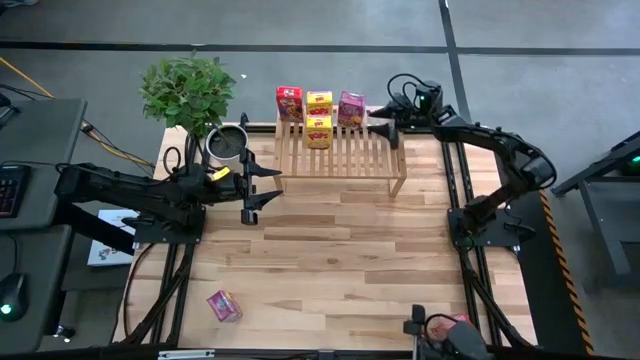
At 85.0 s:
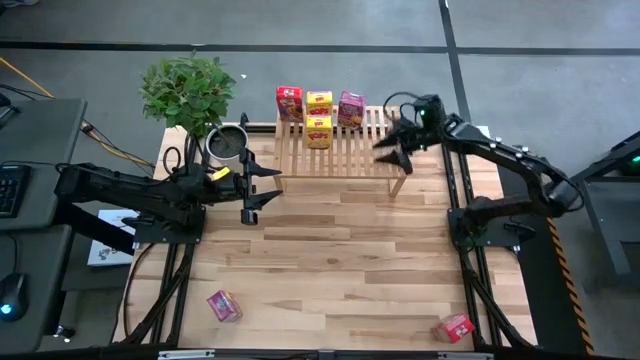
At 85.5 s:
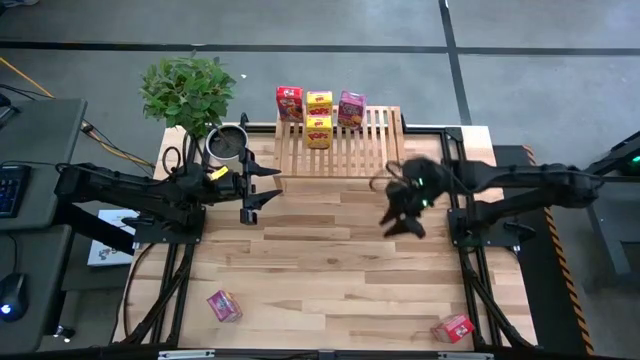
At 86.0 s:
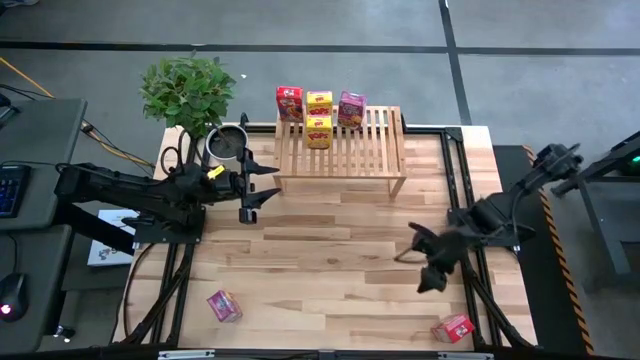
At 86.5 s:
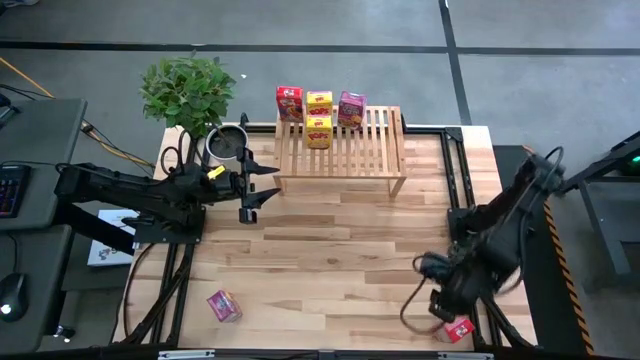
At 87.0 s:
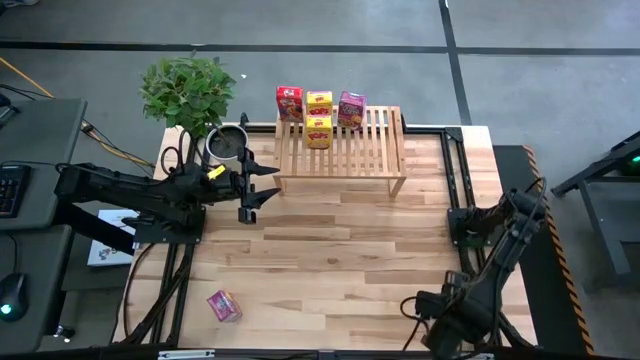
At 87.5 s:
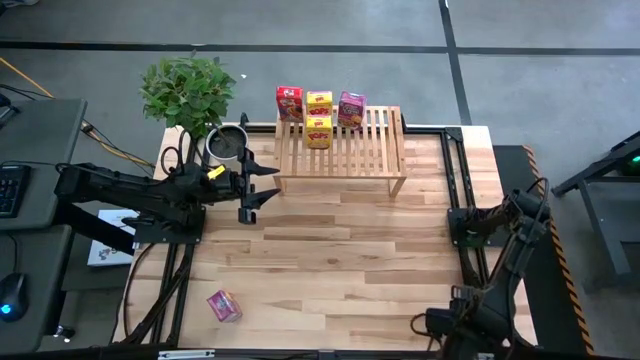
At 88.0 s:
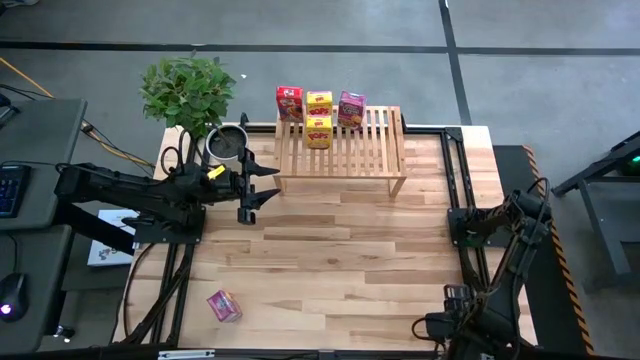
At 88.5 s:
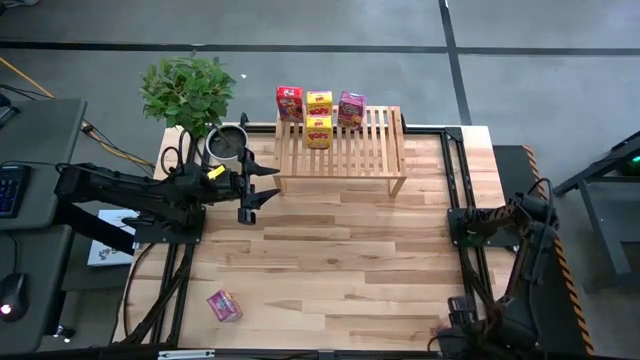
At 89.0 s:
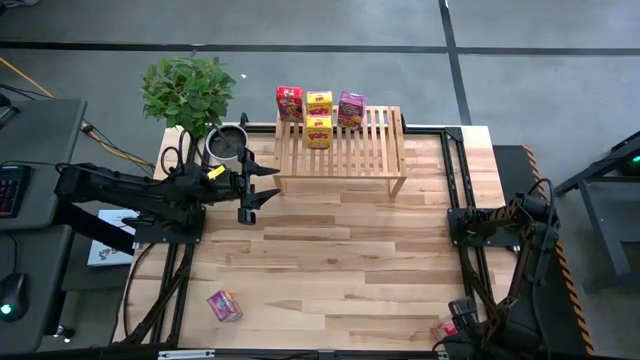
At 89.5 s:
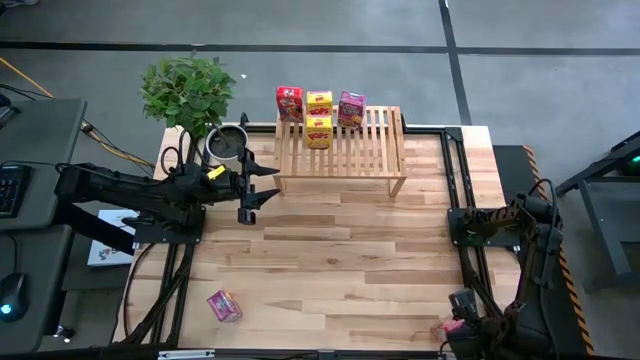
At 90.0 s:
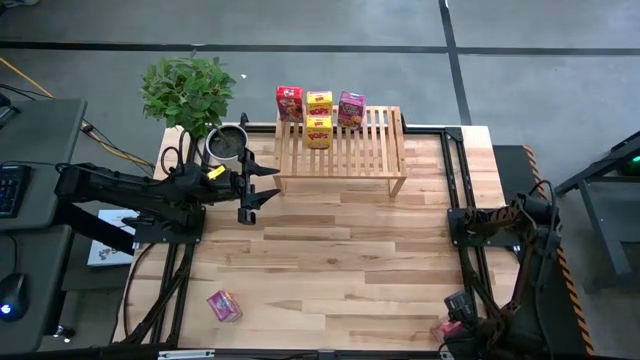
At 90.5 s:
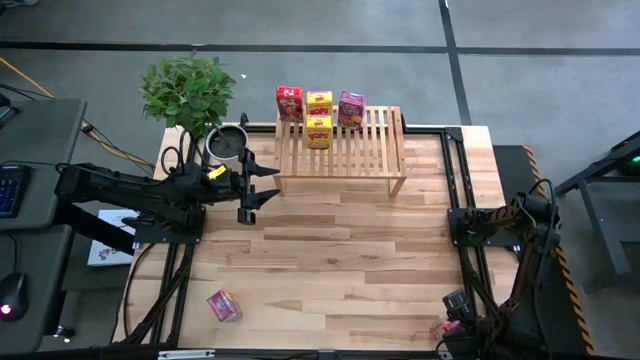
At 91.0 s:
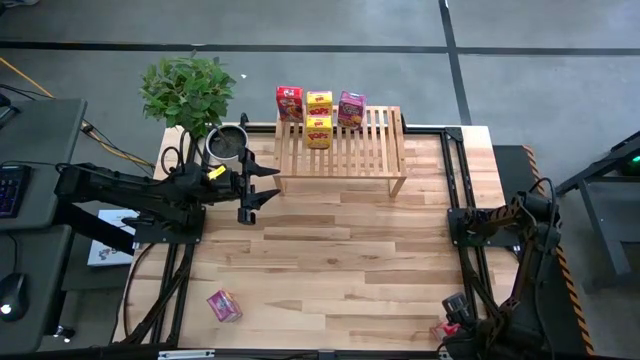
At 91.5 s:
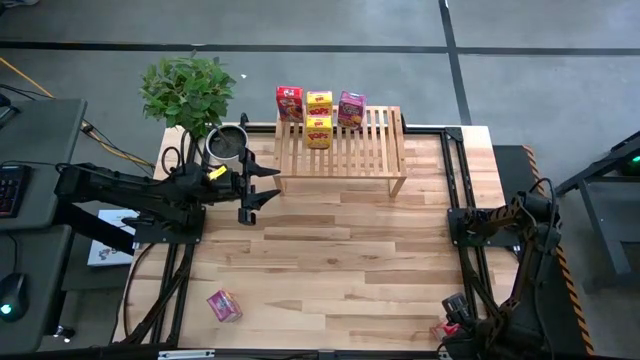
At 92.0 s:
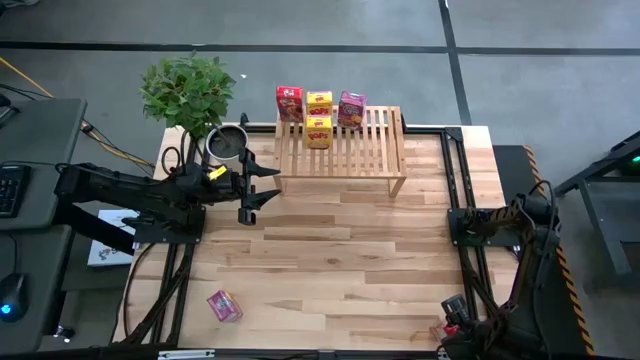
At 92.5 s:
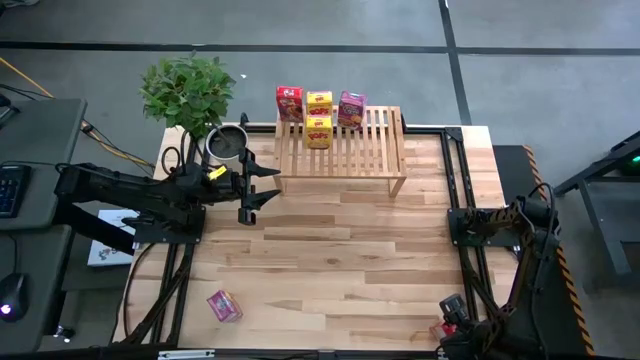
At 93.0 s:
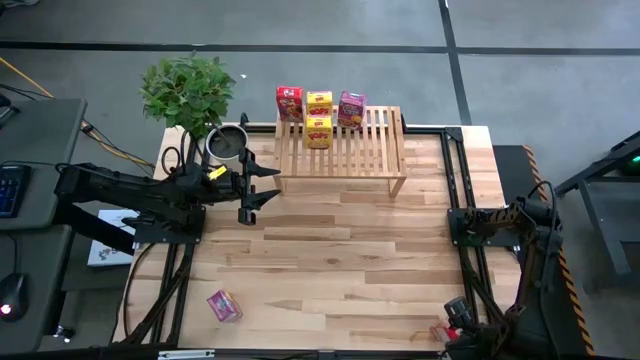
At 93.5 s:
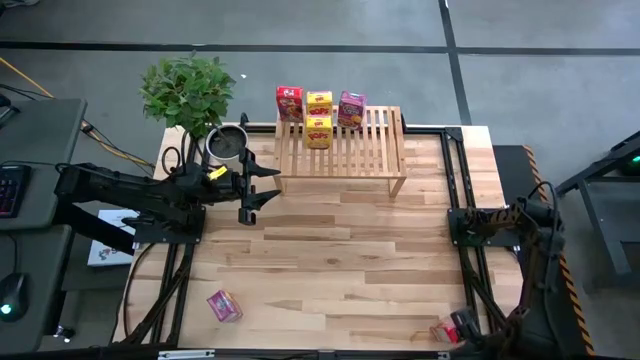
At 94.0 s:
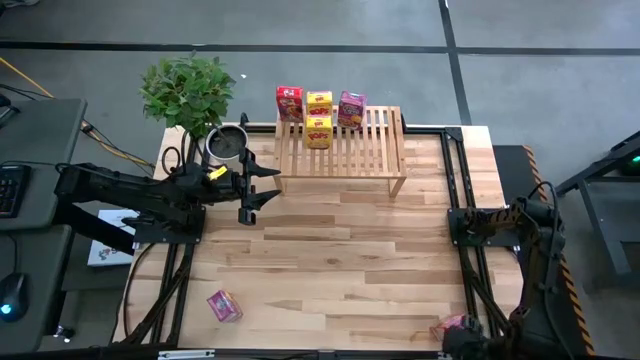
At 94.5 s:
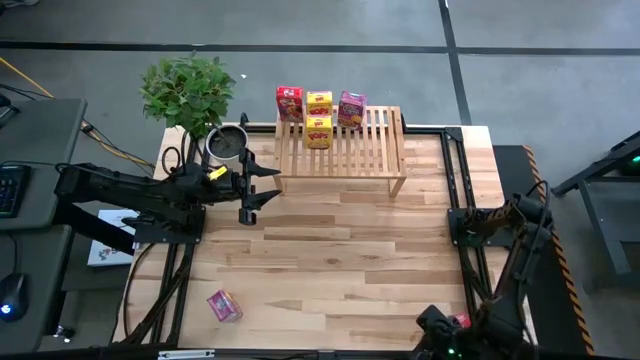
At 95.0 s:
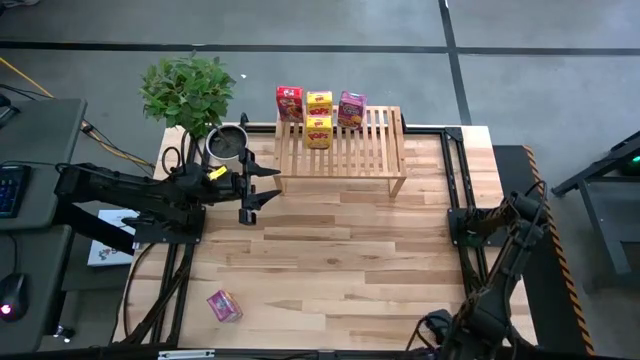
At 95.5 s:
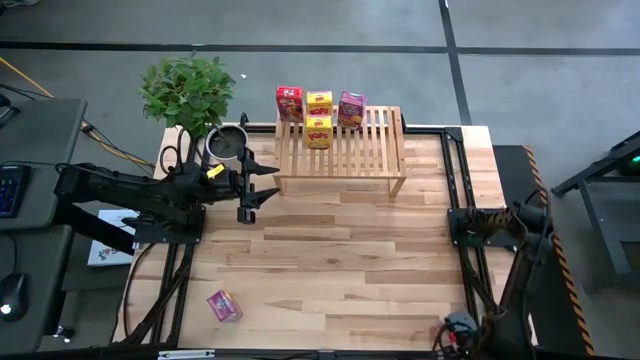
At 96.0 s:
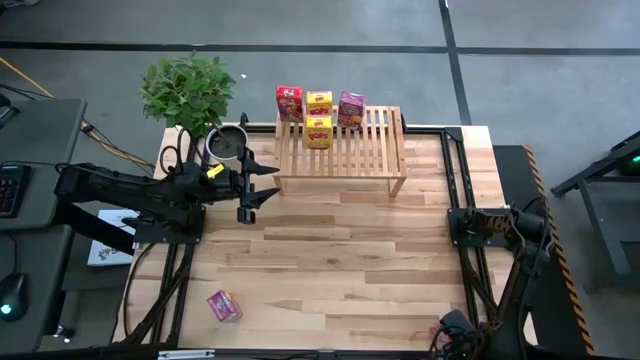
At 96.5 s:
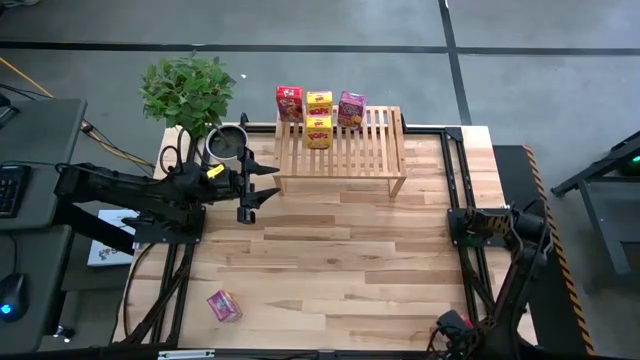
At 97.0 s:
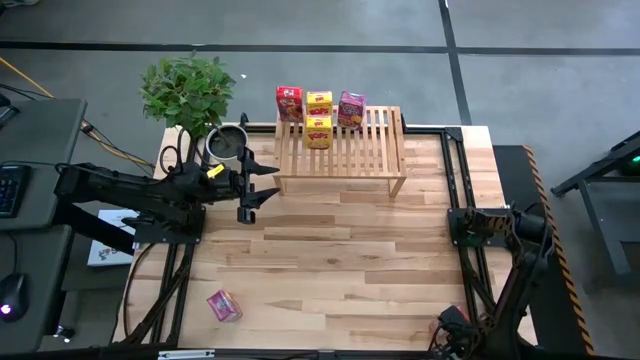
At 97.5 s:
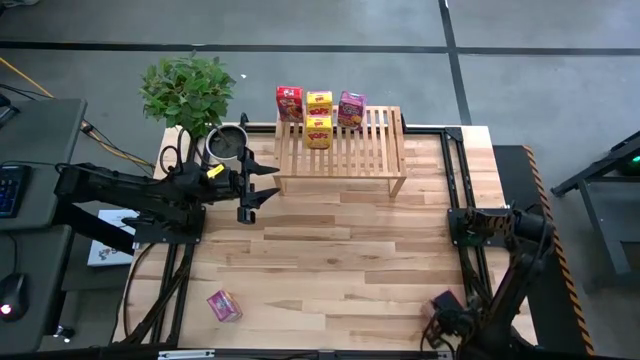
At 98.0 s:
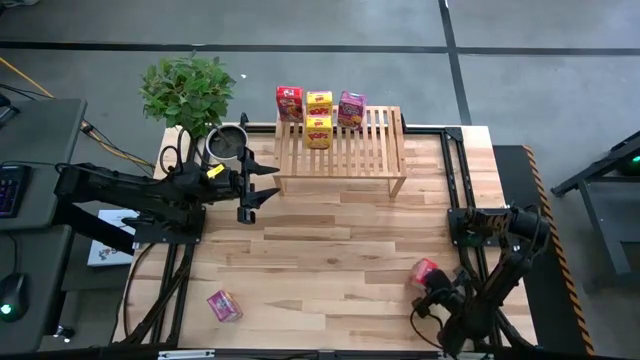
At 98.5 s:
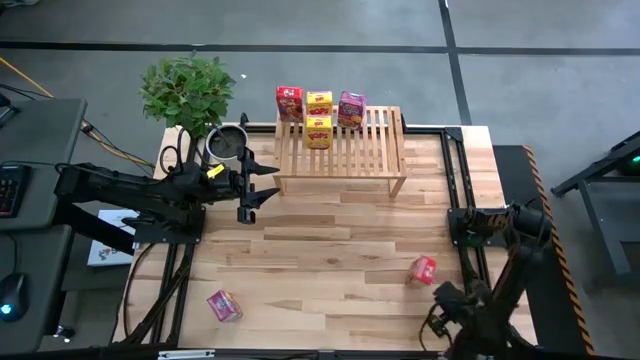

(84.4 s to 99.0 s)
Task: Stack cereal on shelf
Align the red cereal box with the other red cereal box on the shelf

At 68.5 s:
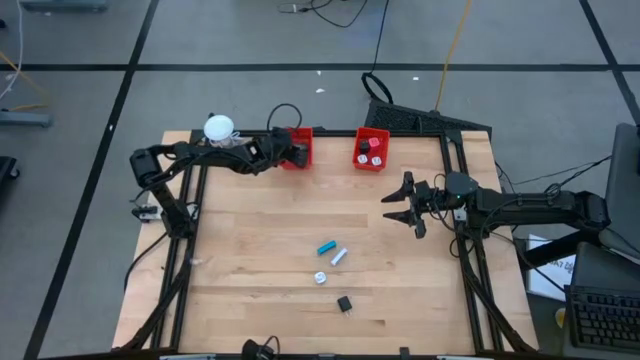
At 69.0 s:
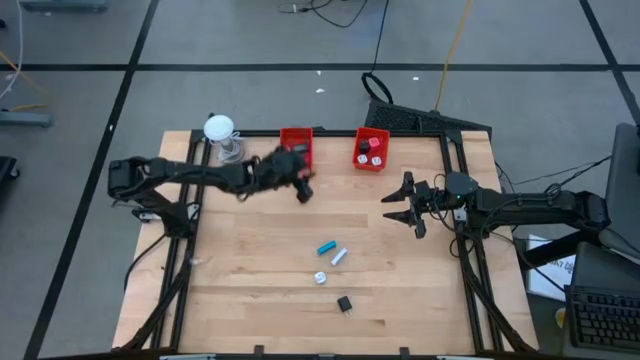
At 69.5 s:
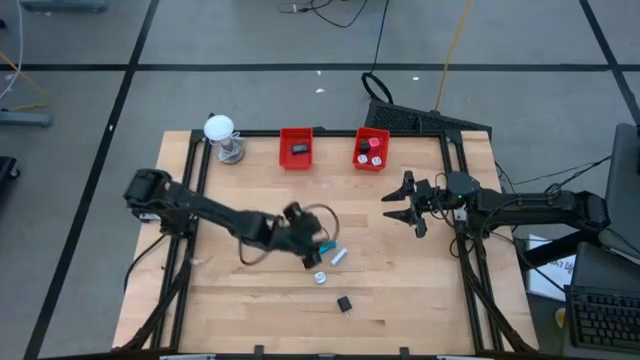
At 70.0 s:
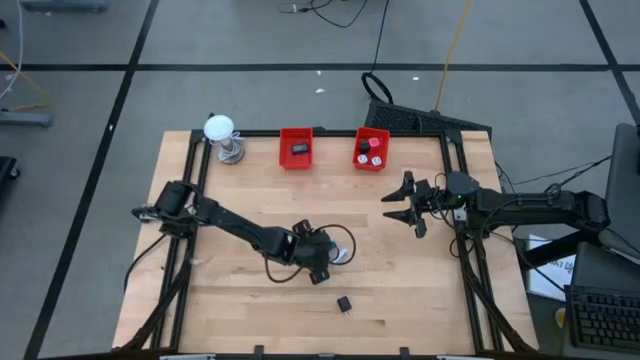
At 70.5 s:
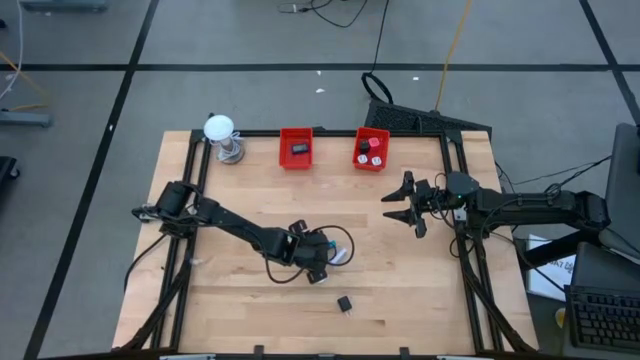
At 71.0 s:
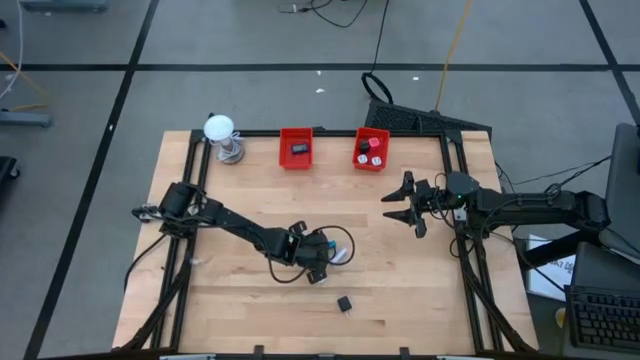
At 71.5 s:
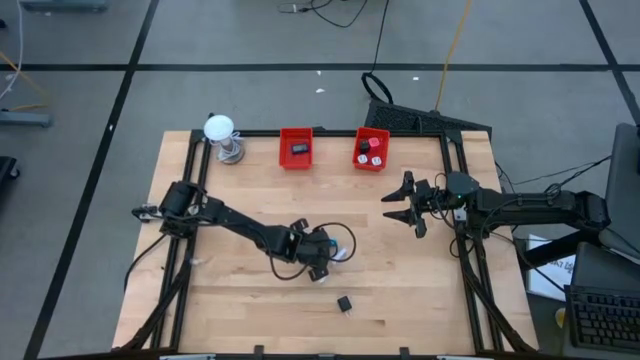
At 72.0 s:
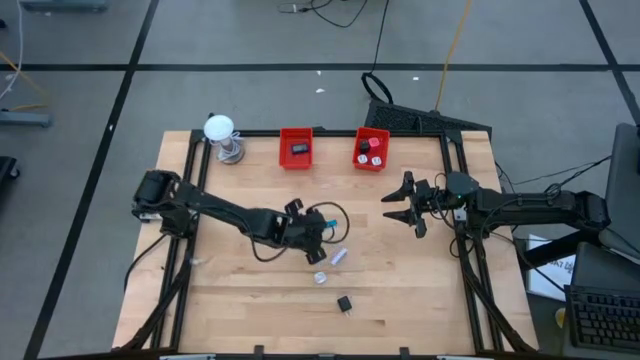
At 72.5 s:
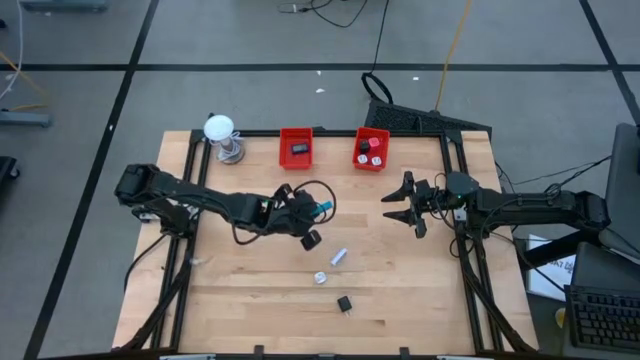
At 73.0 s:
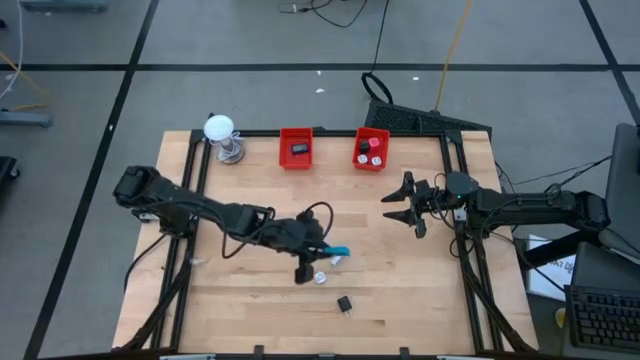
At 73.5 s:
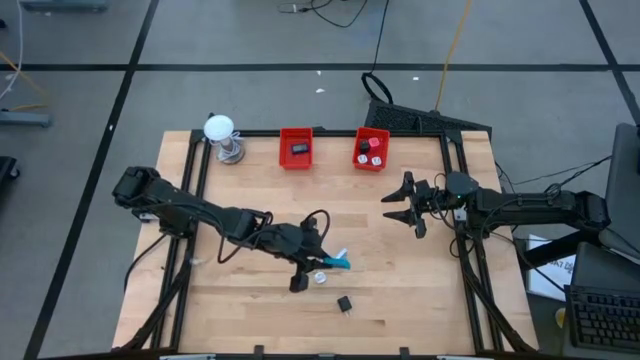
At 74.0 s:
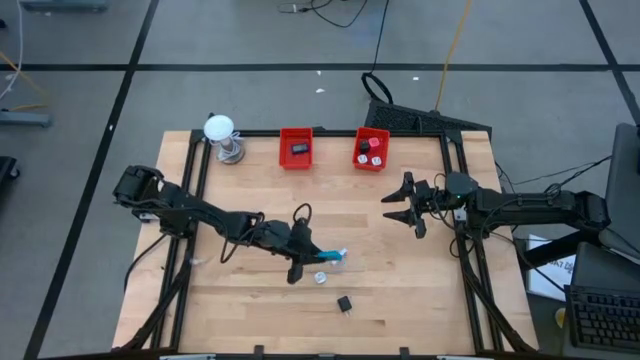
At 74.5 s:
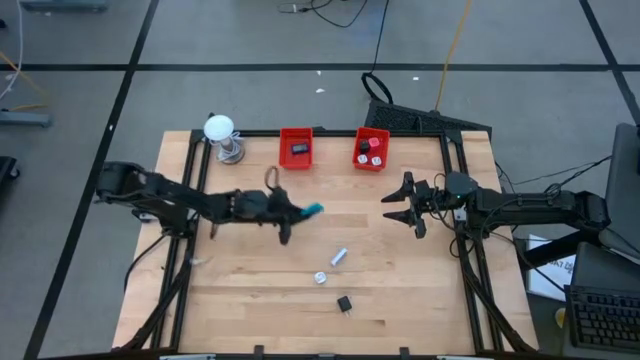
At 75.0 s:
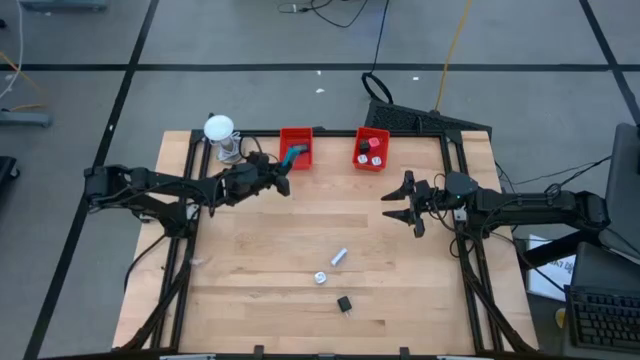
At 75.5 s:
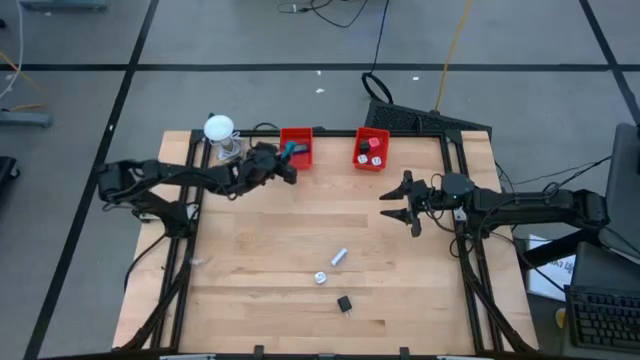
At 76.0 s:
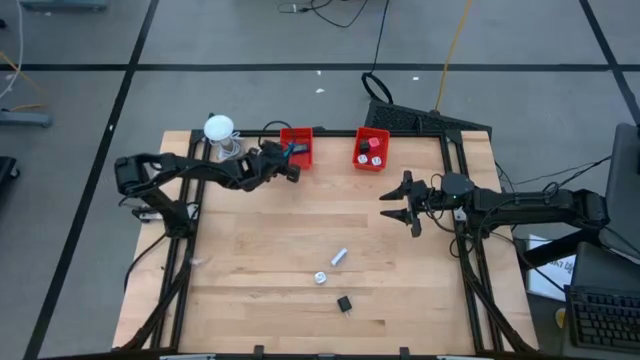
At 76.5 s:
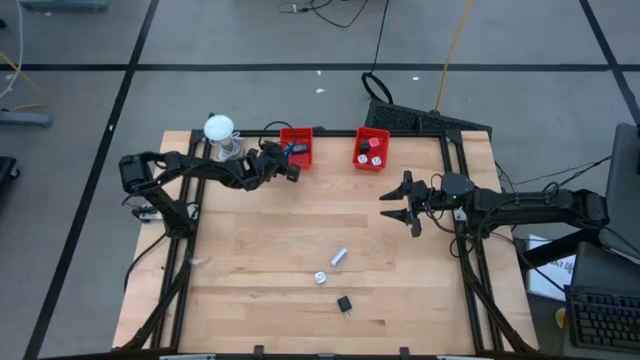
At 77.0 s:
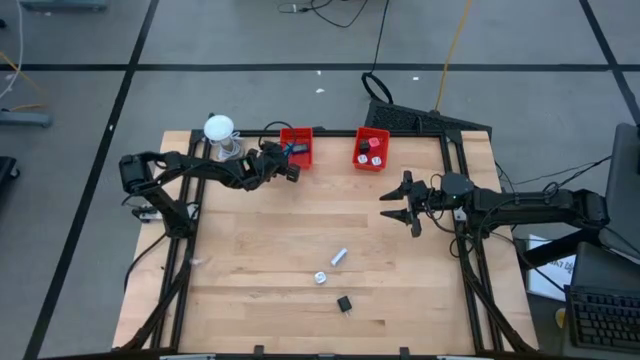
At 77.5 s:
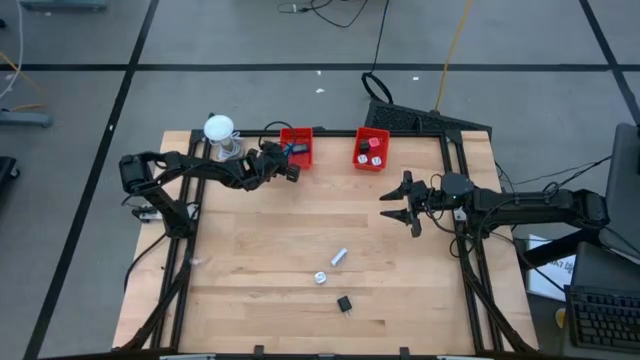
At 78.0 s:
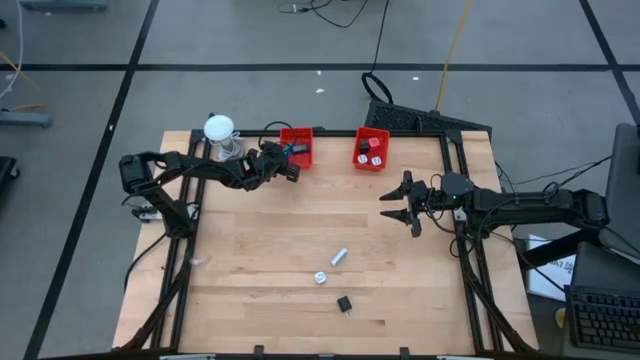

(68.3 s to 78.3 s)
Task: Pick & Place Office items
Put the blue digital timer into the left red basket
